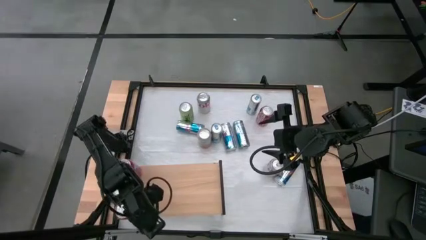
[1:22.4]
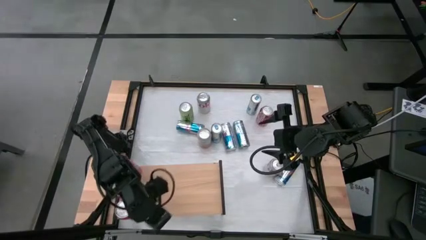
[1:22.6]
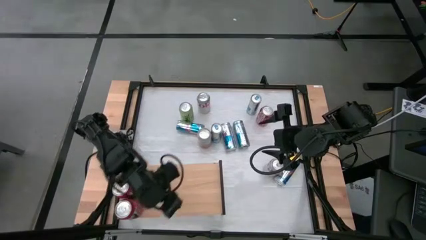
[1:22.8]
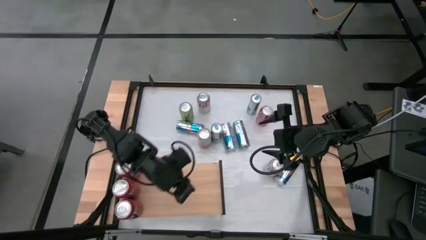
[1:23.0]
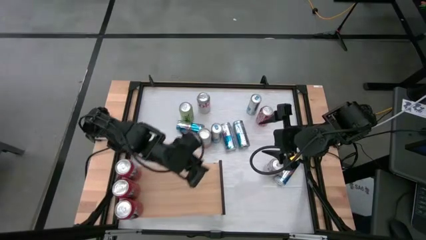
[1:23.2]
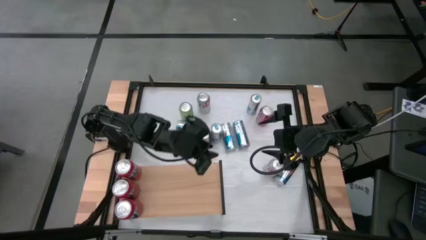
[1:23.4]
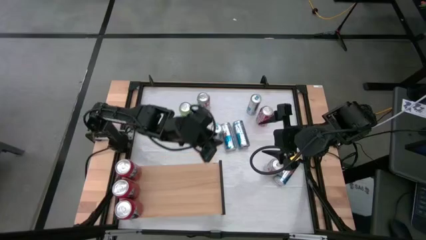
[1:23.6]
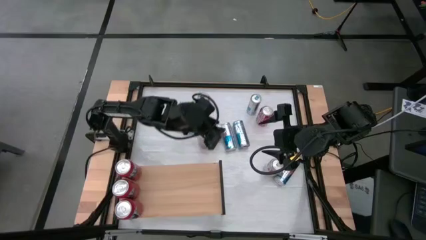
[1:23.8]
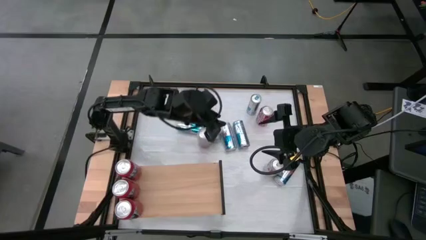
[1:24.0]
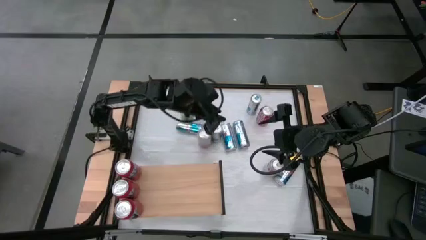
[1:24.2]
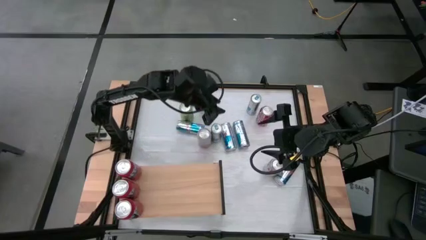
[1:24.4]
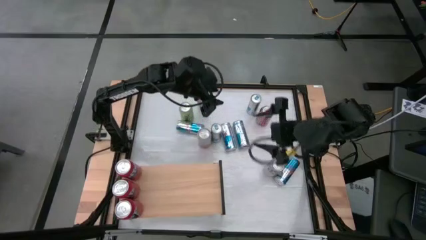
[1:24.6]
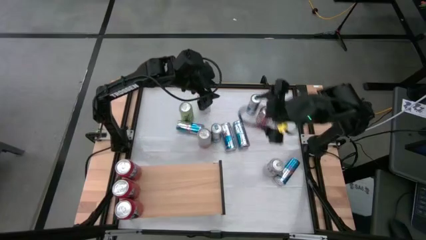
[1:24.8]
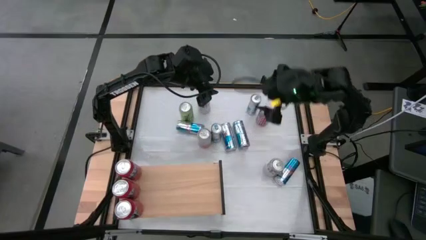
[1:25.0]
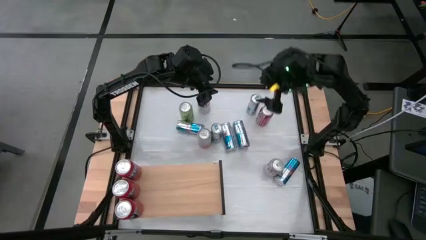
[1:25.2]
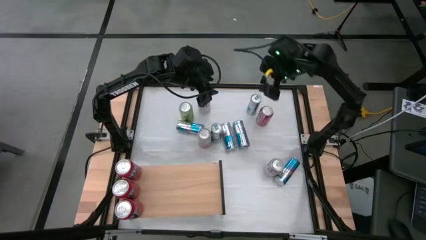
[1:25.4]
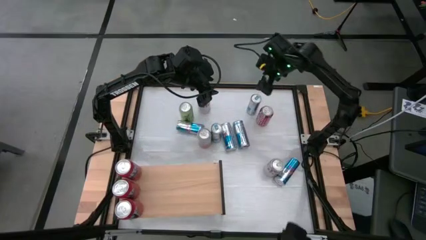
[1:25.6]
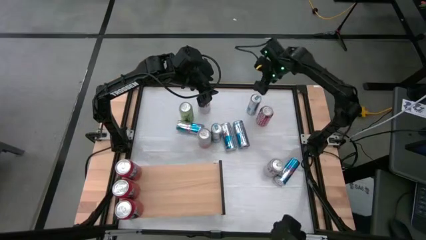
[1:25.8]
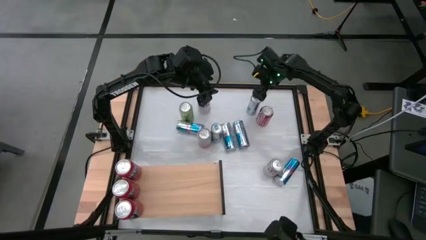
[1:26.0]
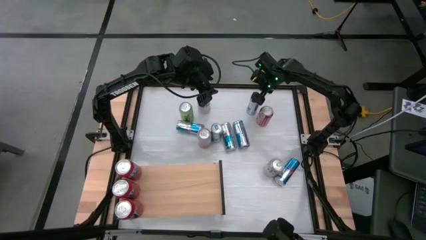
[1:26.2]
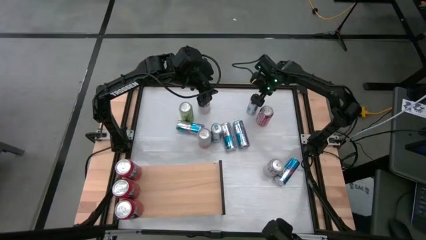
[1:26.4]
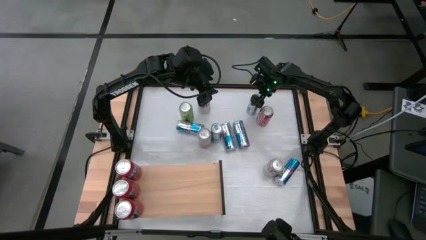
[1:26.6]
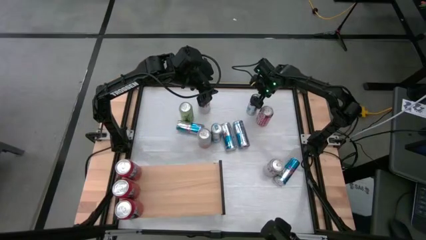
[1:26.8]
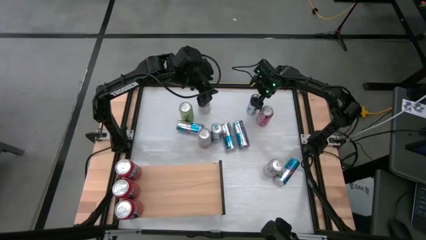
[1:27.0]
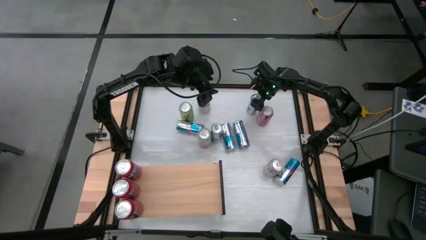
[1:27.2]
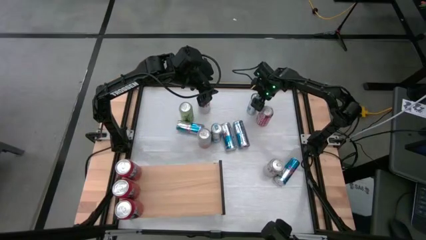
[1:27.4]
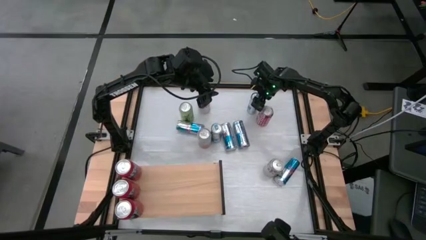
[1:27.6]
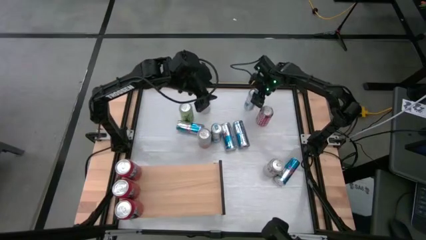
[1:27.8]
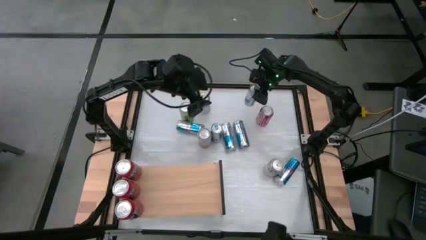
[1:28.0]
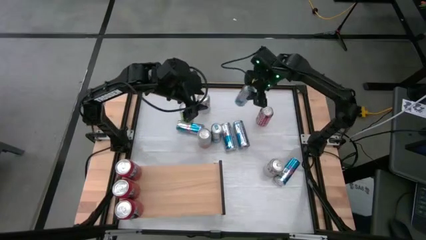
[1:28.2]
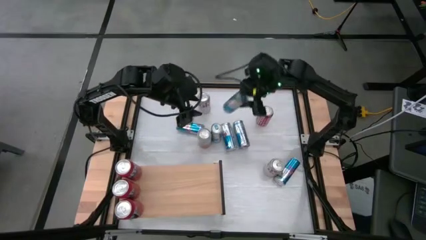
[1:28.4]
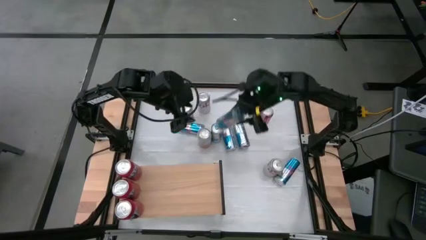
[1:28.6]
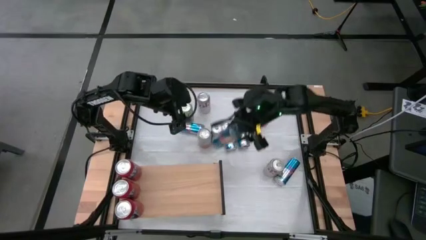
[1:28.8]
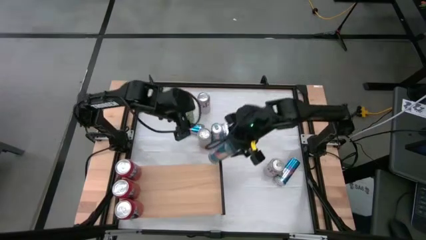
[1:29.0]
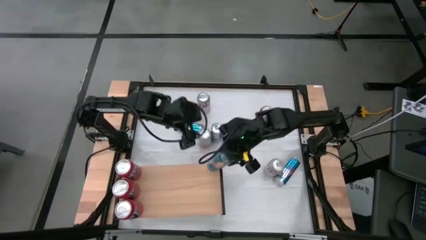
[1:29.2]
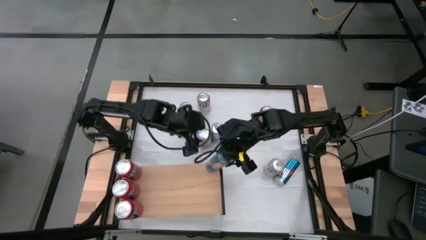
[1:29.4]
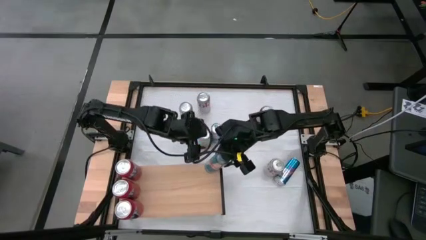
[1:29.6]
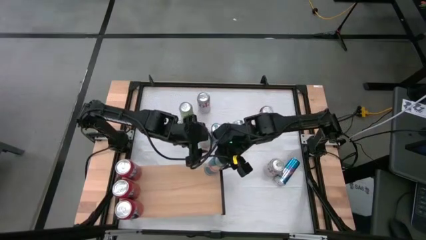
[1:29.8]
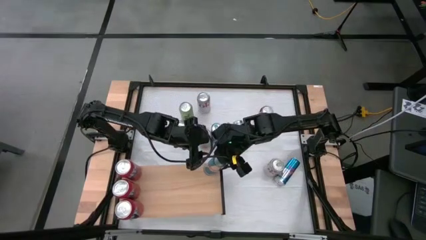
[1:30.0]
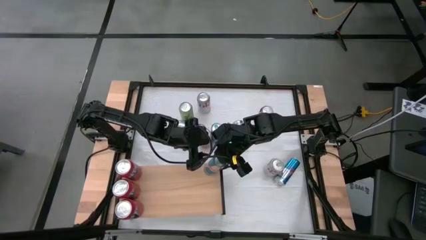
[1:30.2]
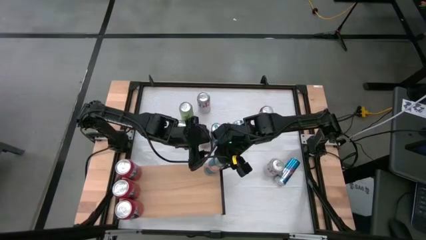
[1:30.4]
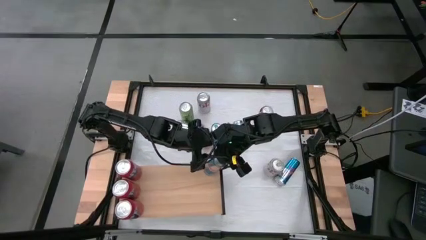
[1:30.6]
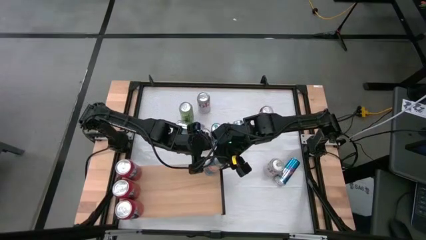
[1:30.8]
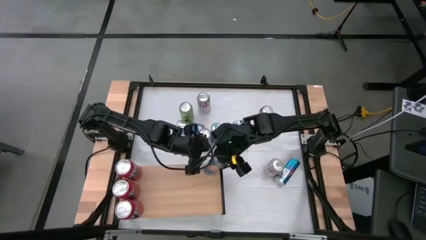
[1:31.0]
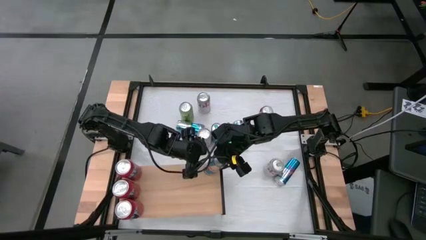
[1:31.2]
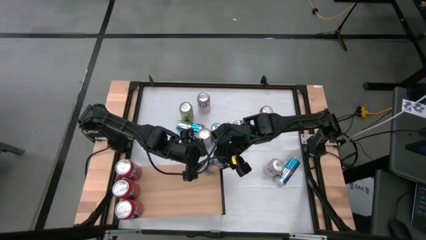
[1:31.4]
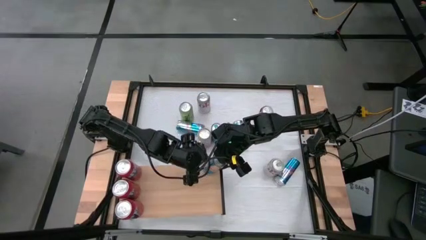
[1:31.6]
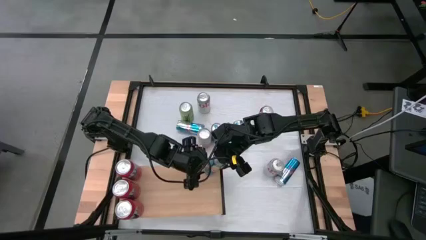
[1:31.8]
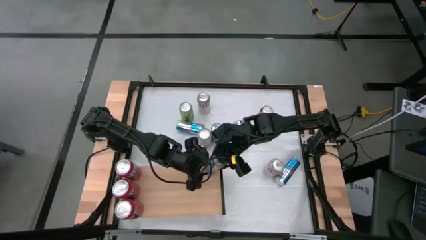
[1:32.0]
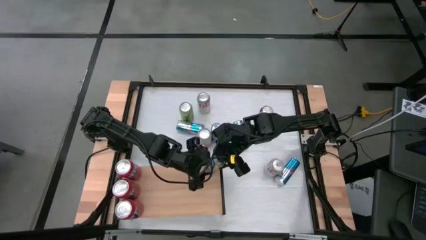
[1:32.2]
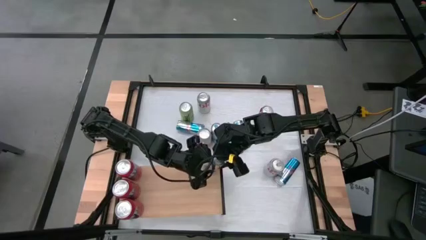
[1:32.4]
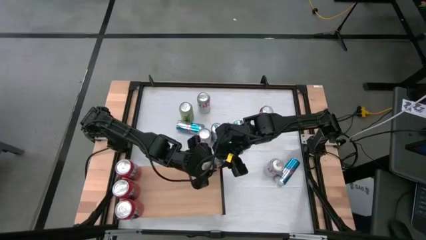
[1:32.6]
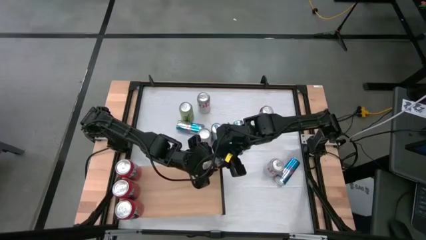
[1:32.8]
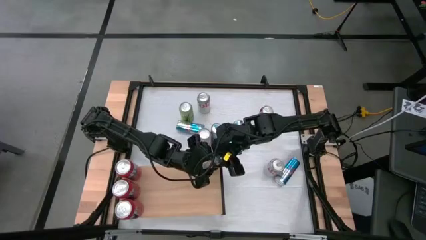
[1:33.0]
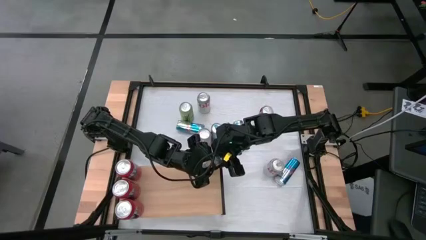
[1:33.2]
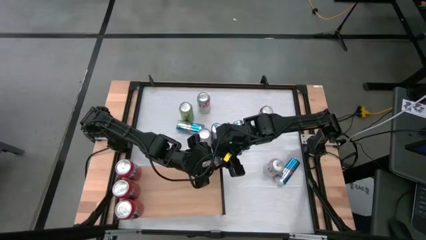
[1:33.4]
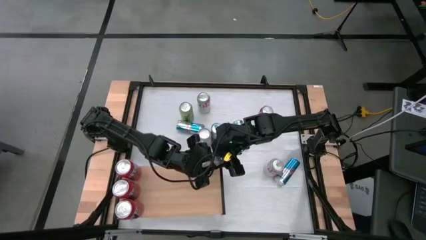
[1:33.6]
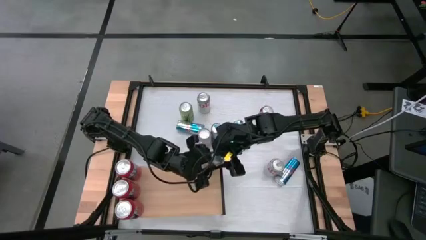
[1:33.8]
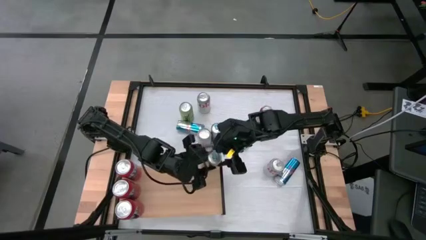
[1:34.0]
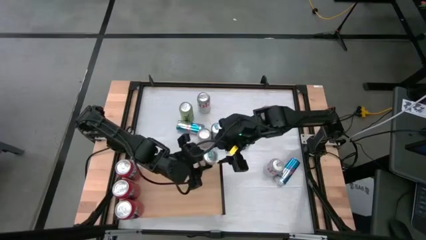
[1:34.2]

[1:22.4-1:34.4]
Task: Place canned beverage on shelf
Put the blue soda can on the shelf

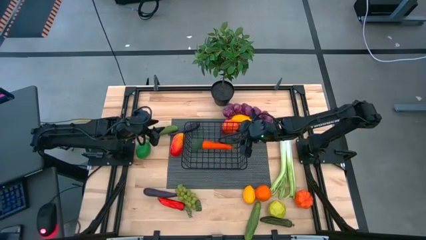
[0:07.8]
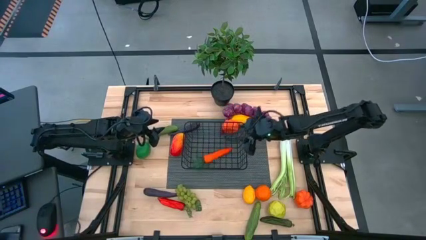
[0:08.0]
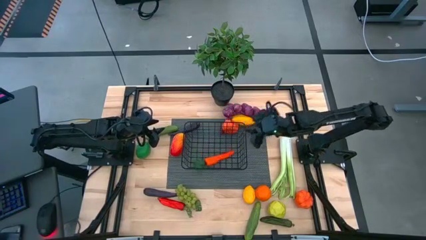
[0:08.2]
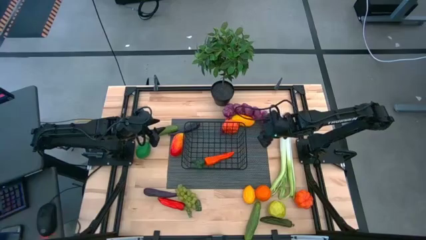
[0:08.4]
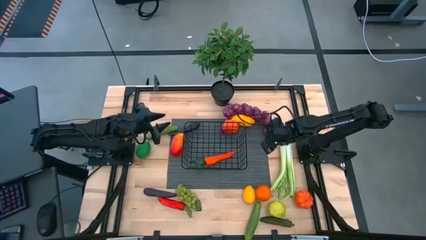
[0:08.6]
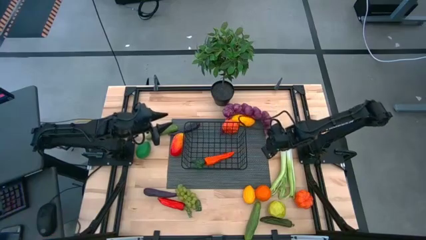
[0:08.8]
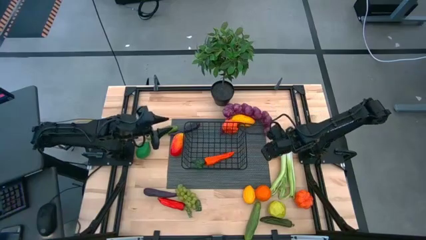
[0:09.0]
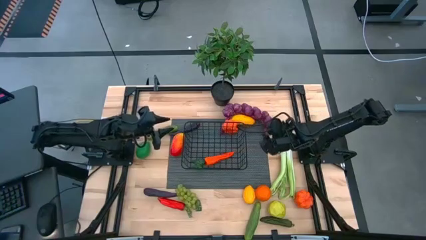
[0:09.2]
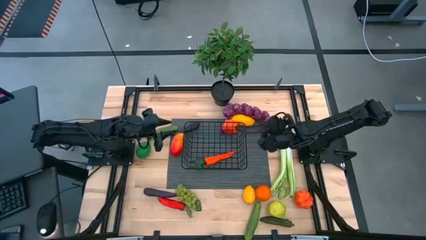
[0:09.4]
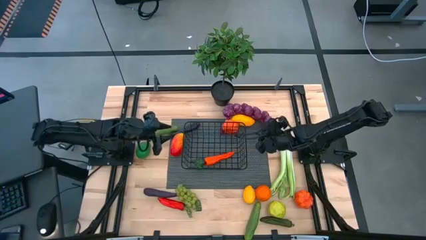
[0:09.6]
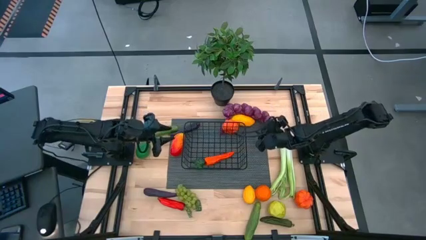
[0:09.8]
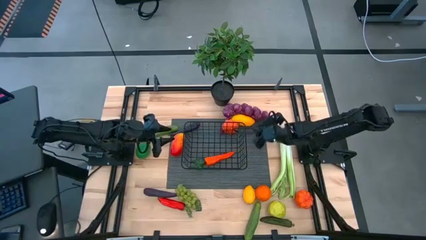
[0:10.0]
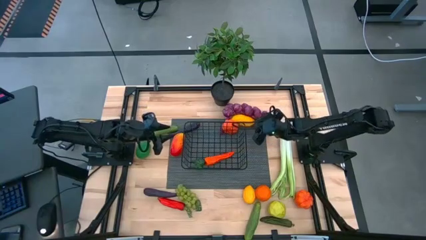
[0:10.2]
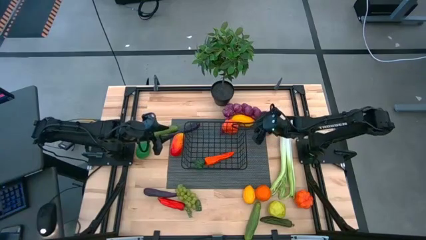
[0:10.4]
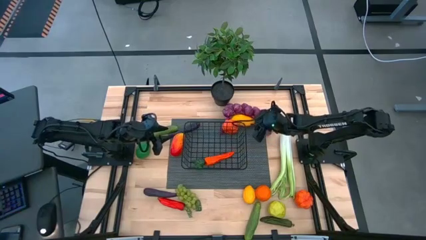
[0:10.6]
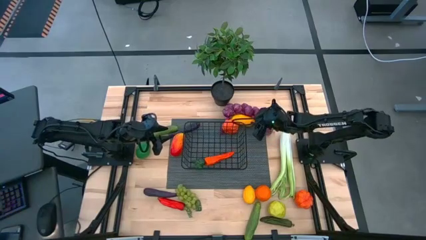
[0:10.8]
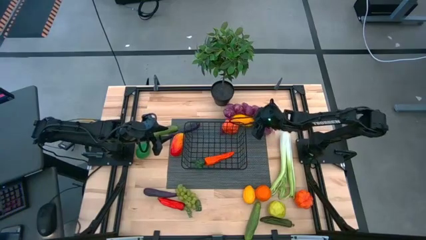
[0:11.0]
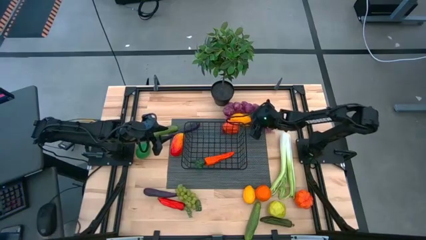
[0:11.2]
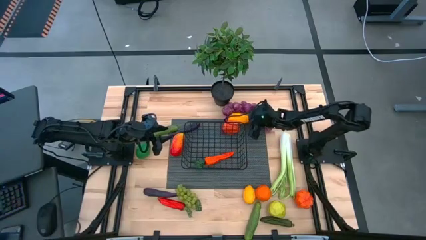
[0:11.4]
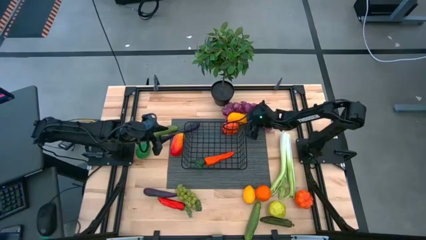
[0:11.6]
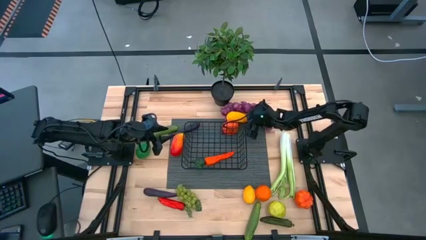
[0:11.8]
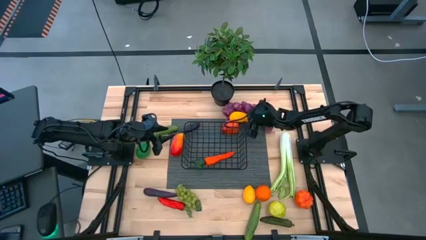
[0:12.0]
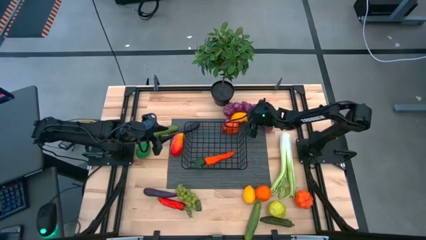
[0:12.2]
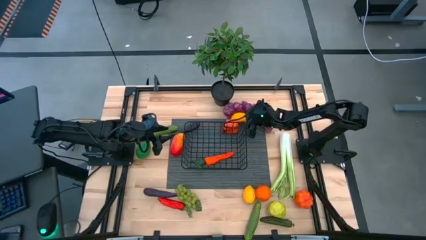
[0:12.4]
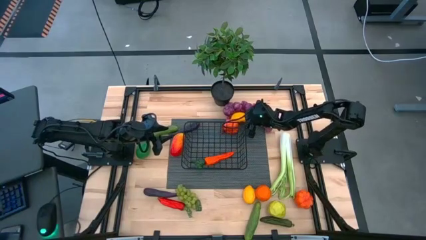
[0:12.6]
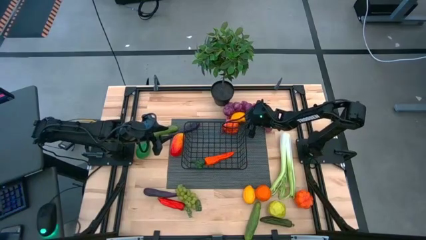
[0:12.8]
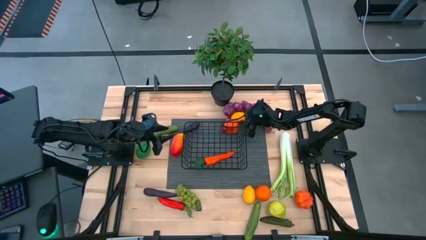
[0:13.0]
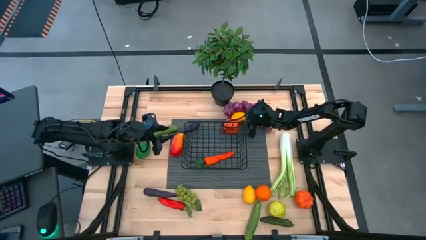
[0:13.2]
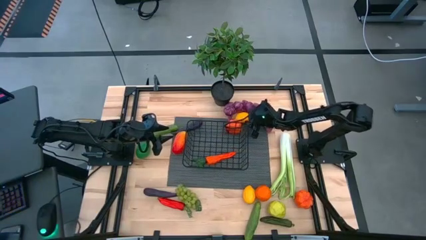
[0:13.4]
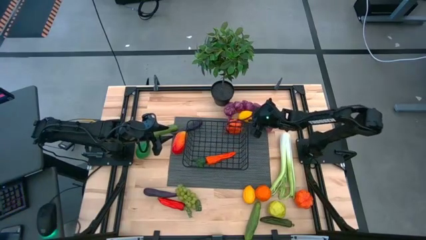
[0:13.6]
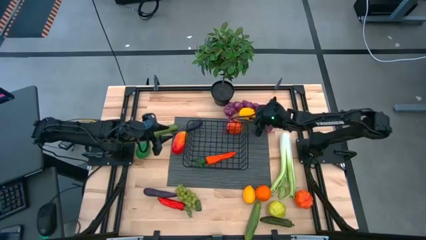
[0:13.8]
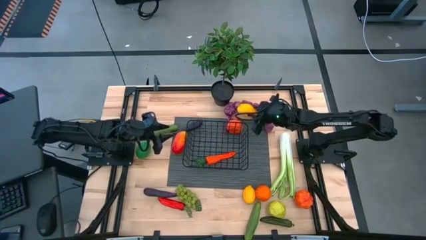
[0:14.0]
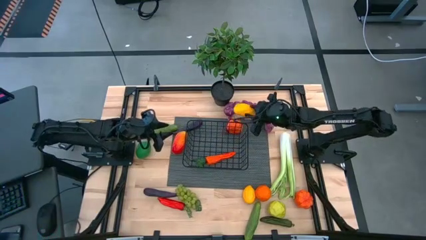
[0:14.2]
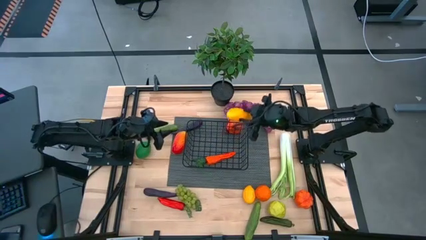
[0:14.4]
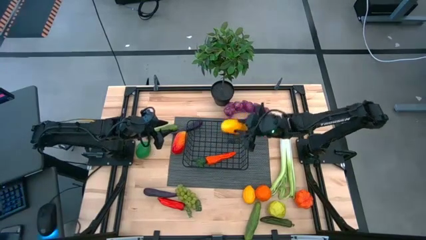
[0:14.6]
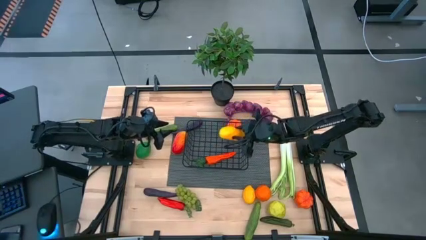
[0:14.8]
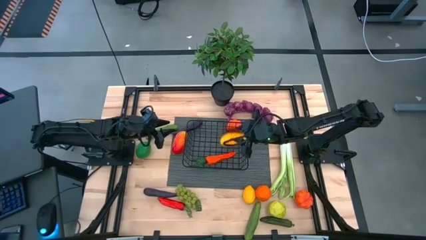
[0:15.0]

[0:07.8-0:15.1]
Task: Build produce basket
Put the yellow mango into the wire basket
